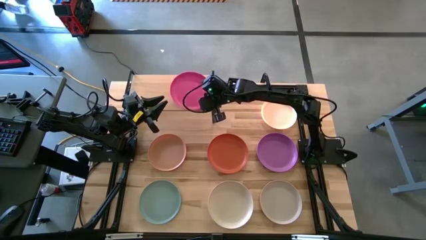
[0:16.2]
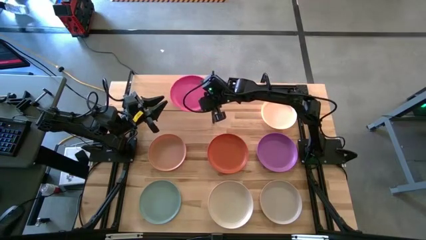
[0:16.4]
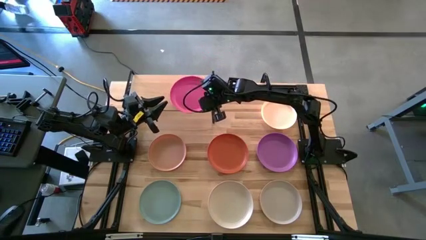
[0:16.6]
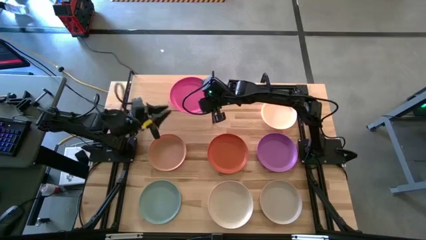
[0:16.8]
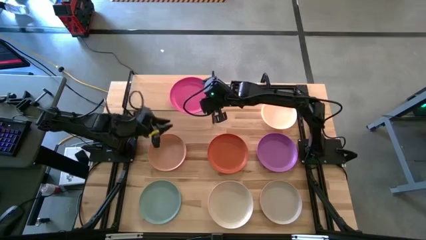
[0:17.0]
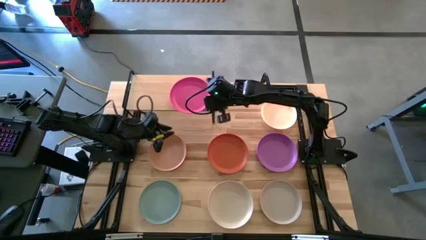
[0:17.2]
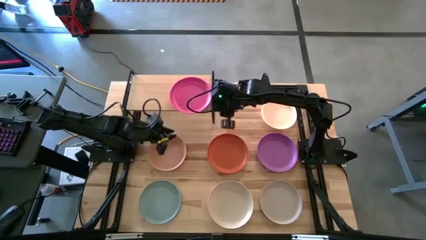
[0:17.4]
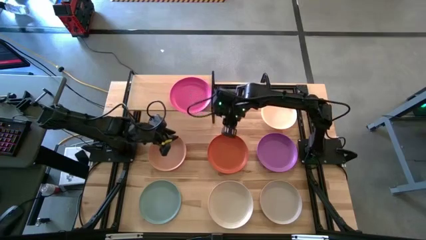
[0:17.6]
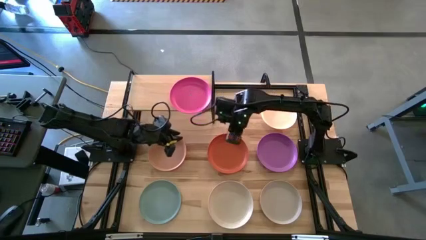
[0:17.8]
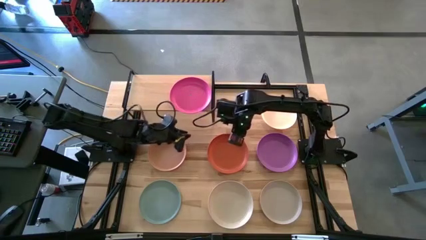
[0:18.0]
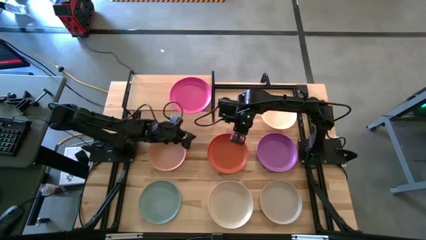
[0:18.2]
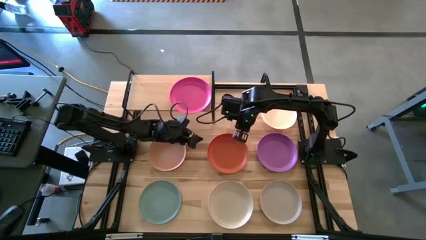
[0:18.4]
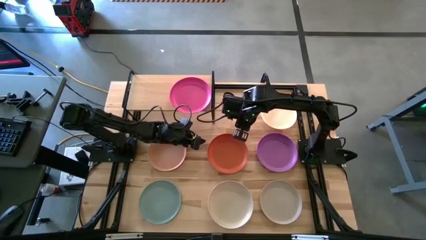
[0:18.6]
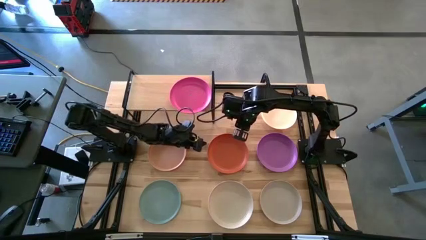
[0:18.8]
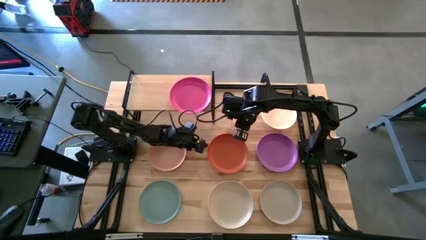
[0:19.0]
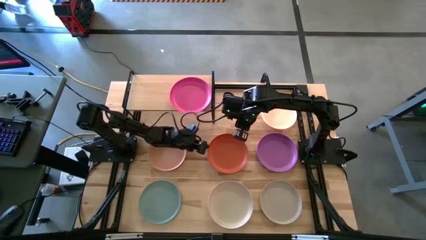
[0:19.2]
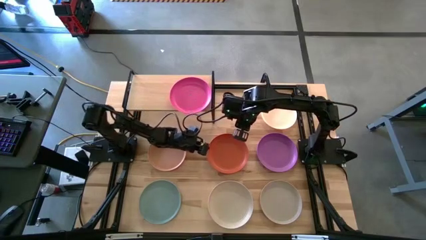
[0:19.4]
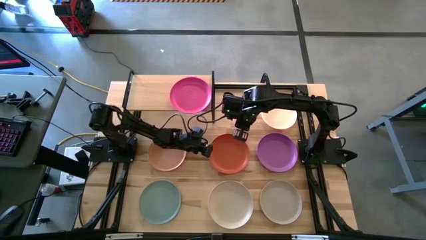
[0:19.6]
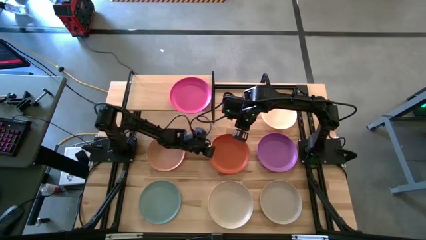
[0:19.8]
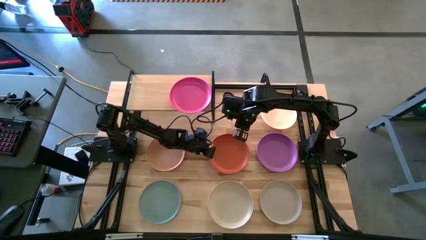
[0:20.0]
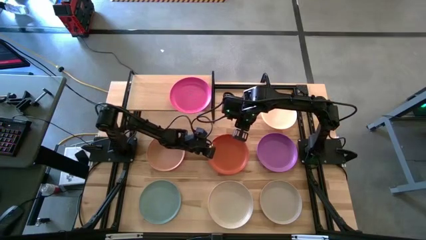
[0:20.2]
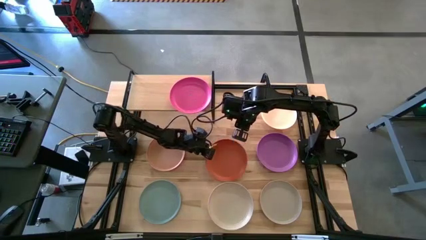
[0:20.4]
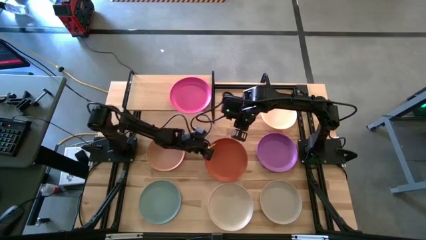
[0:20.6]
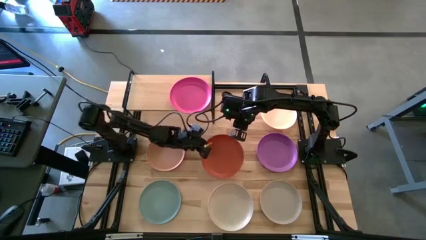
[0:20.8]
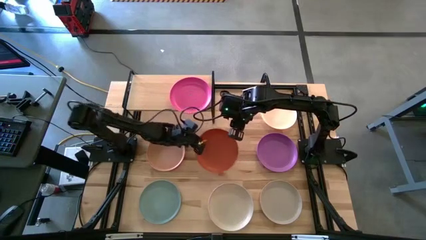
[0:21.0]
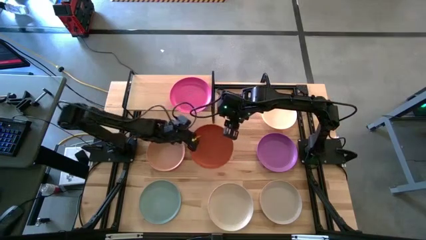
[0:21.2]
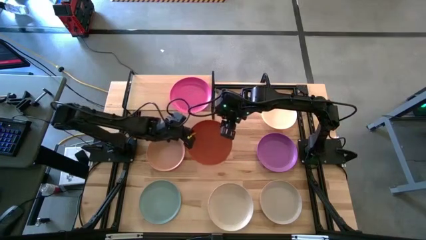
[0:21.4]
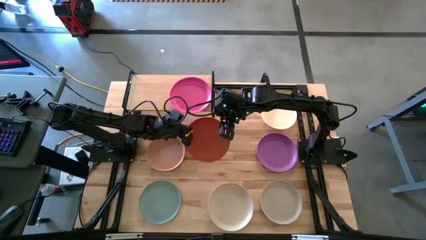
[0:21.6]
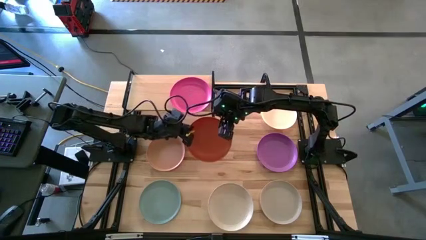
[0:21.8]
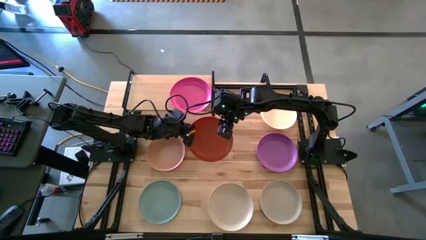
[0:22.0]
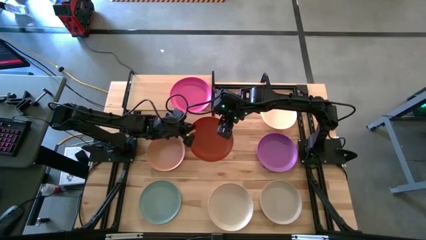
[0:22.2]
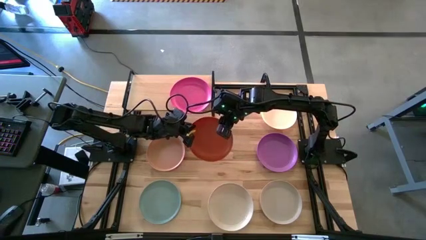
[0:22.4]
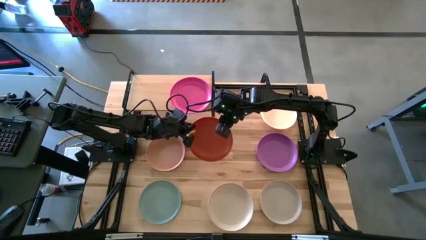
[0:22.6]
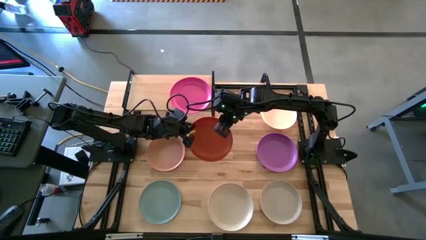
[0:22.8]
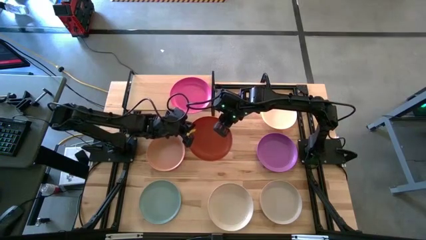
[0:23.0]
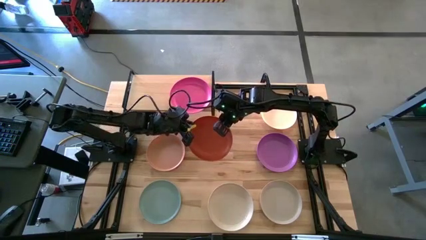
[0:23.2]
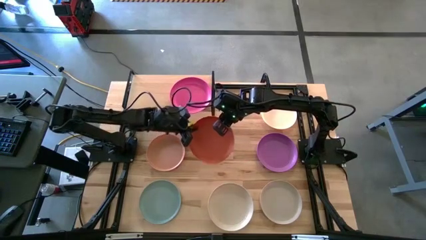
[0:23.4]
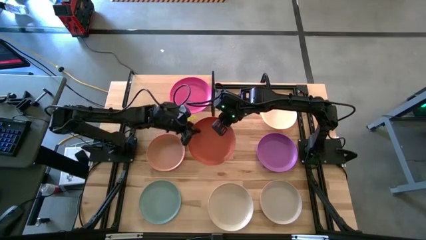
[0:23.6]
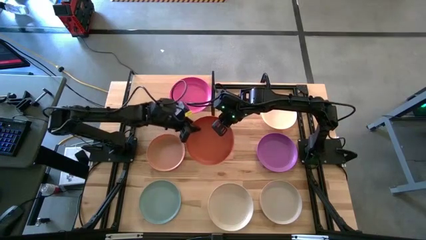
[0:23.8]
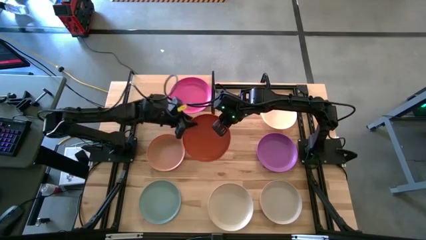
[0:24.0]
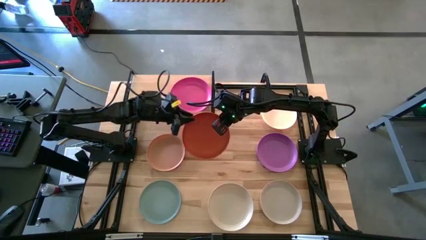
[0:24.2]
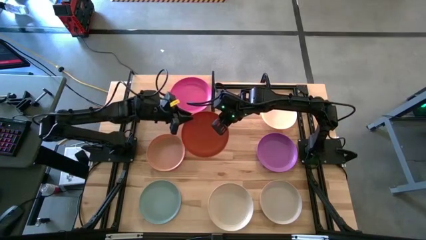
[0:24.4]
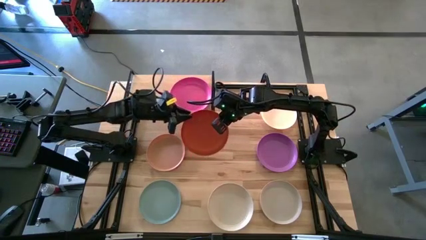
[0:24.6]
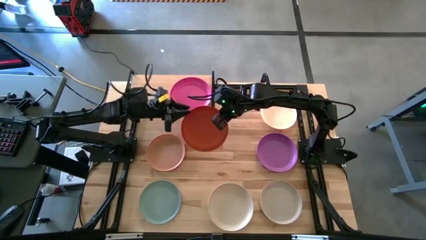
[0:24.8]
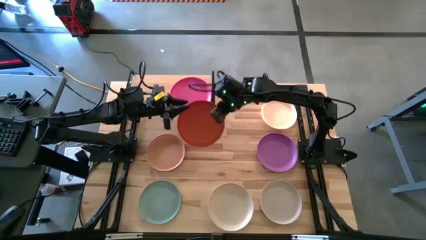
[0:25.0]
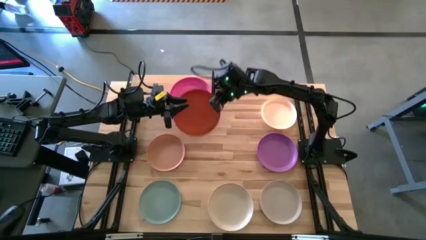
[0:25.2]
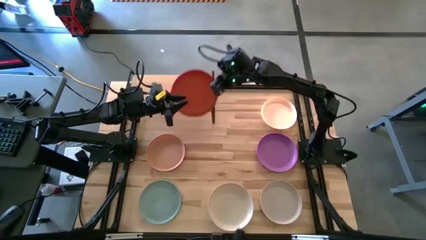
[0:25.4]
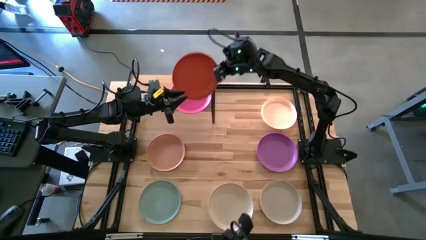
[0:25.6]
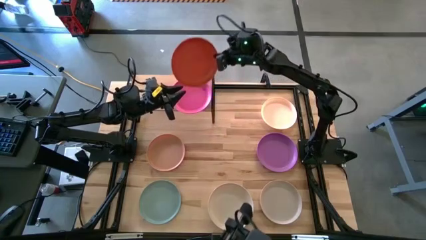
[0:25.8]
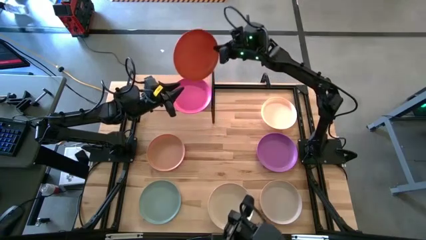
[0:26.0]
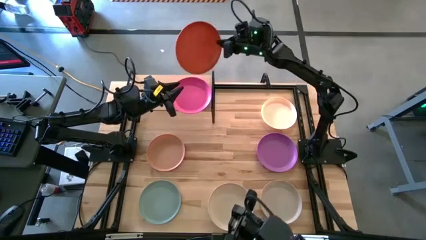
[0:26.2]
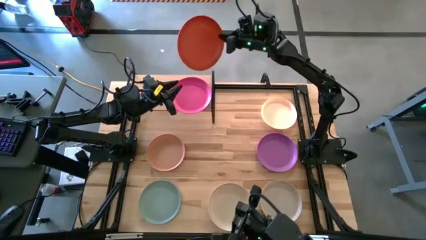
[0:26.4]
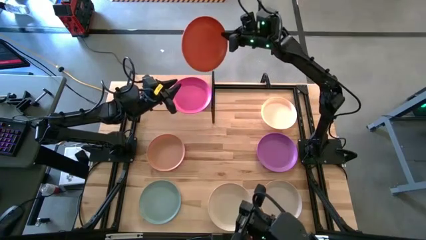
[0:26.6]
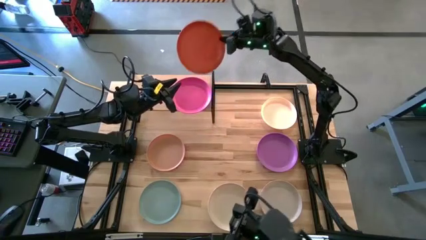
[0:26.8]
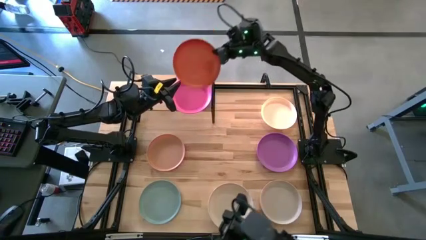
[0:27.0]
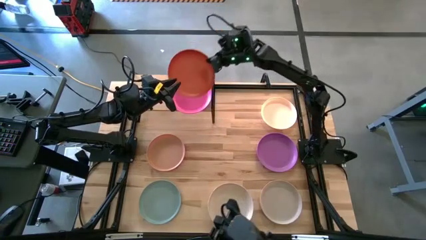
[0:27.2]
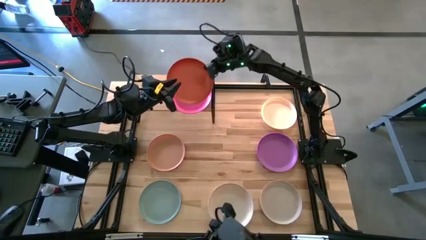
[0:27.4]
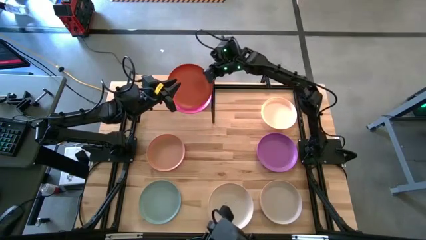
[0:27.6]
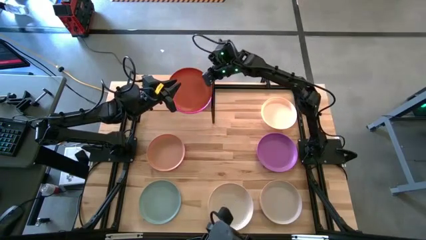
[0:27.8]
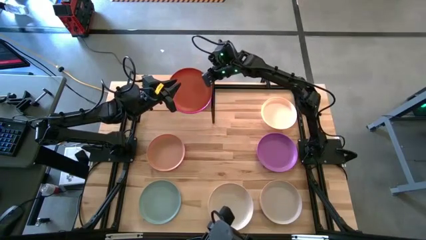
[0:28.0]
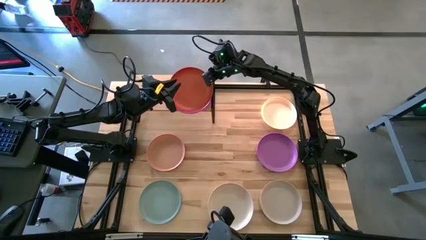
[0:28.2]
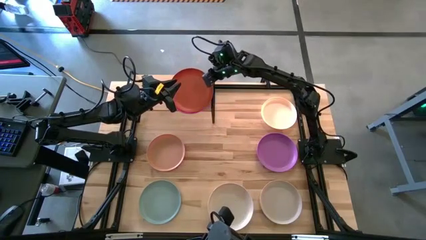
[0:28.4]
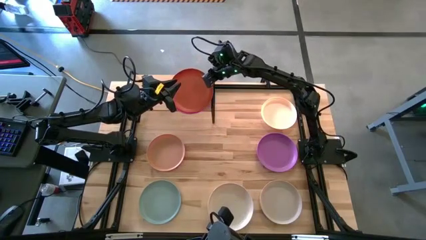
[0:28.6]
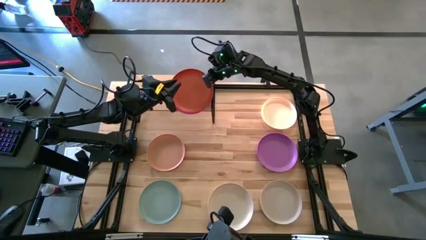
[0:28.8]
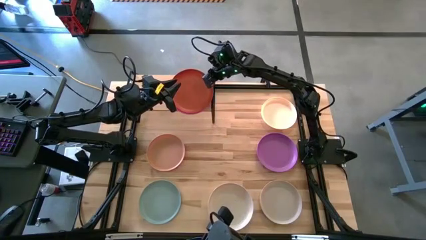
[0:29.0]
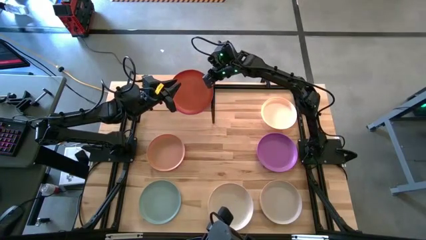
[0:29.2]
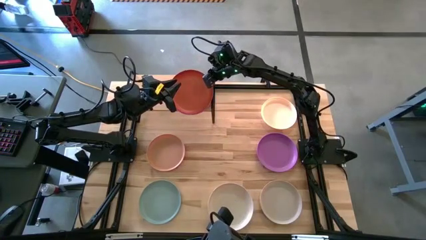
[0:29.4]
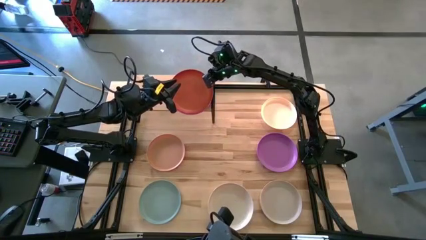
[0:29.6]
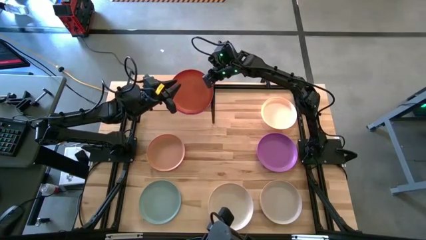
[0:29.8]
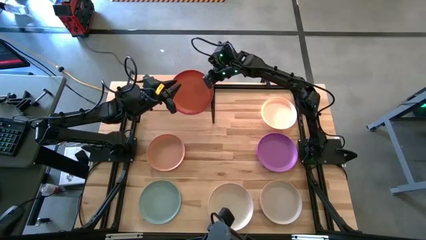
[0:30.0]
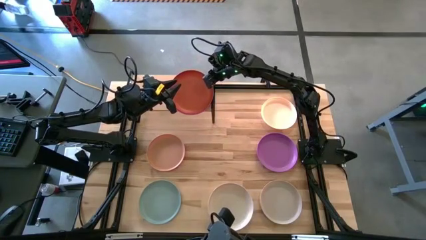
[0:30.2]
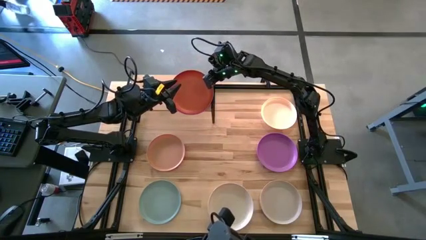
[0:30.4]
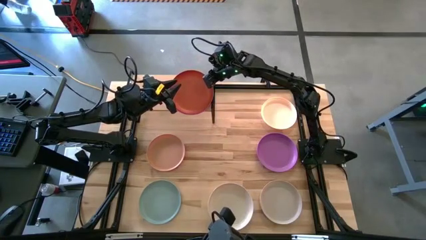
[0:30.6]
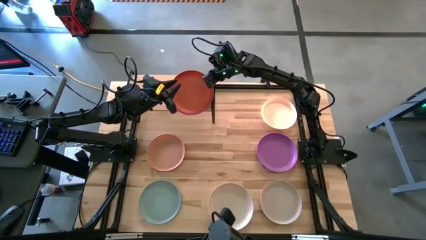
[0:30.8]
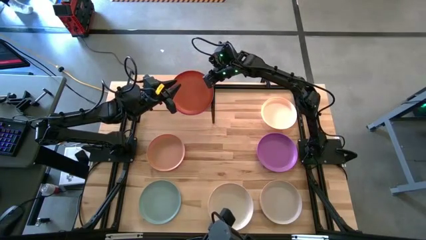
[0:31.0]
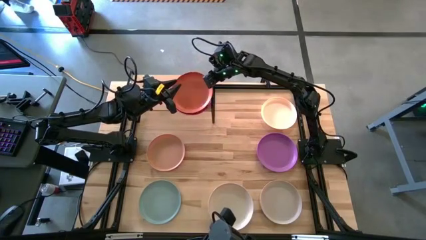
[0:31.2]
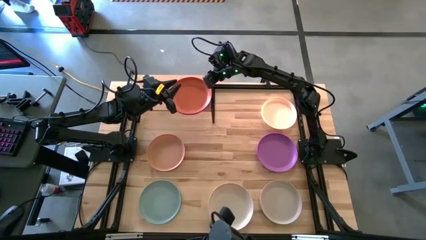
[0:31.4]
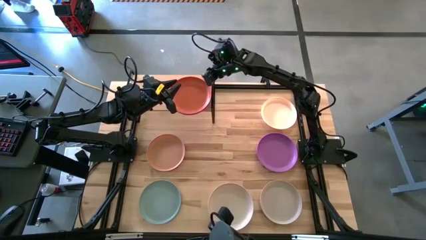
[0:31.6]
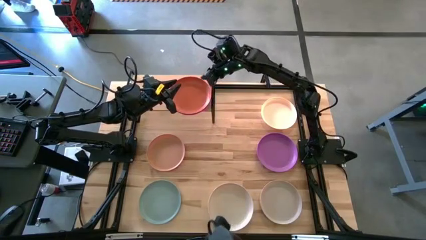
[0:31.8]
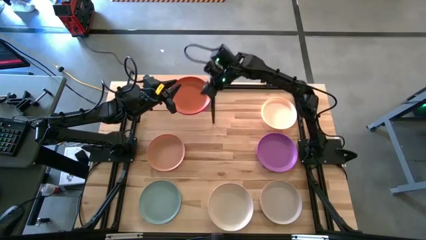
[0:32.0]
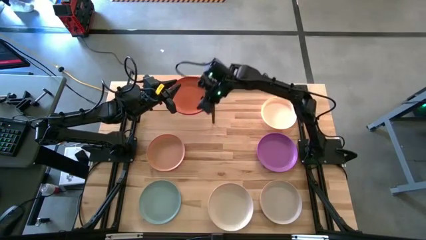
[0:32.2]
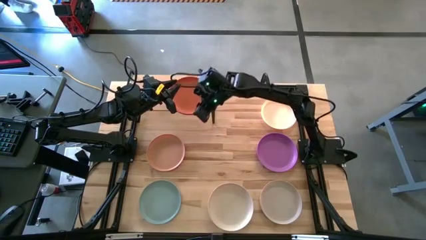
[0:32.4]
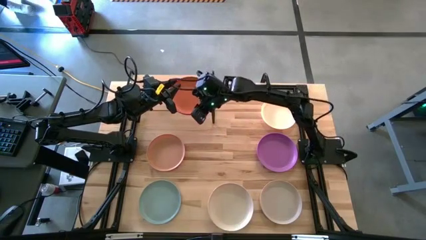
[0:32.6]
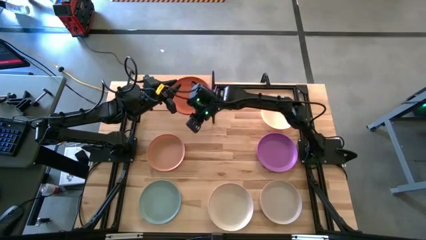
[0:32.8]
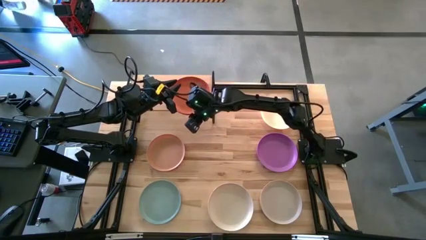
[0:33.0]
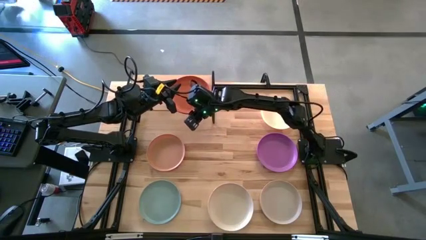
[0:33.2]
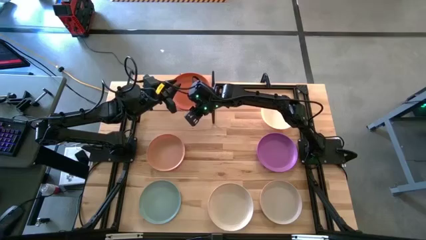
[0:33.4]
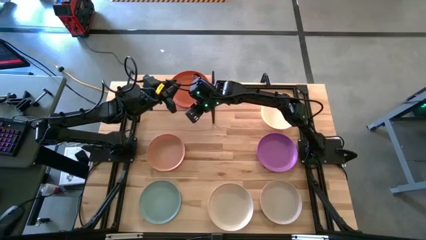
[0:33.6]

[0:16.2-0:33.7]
Task: Place and stack plates onto a shelf
Stack the orange plate on top of the pink plate
